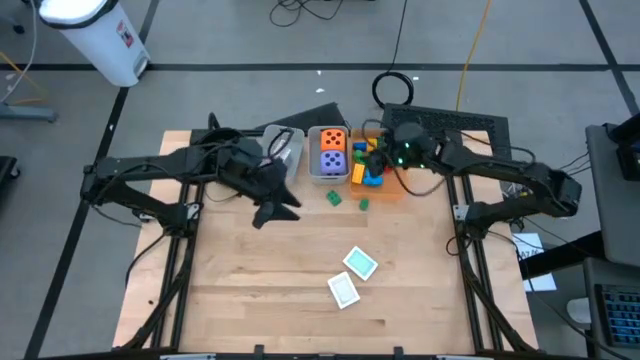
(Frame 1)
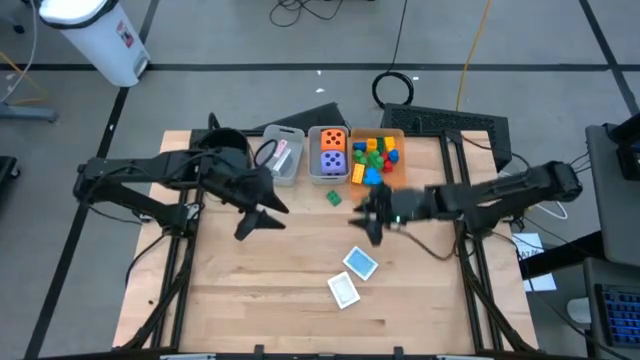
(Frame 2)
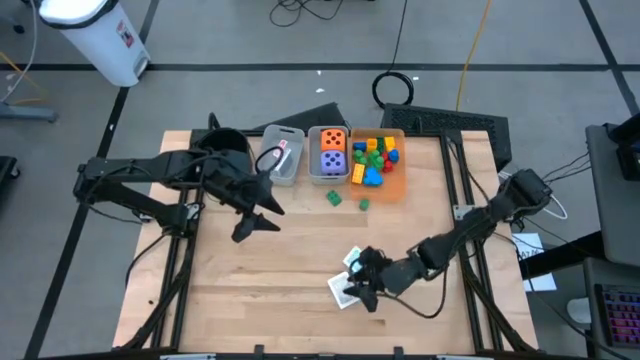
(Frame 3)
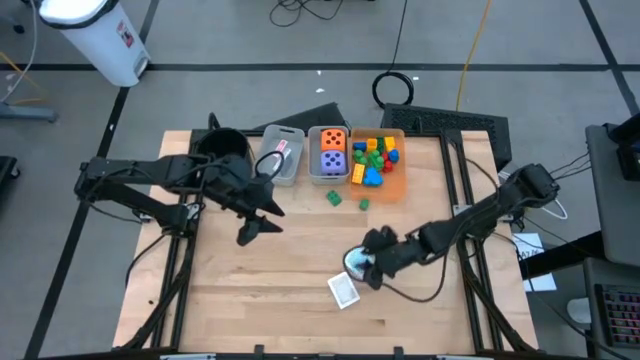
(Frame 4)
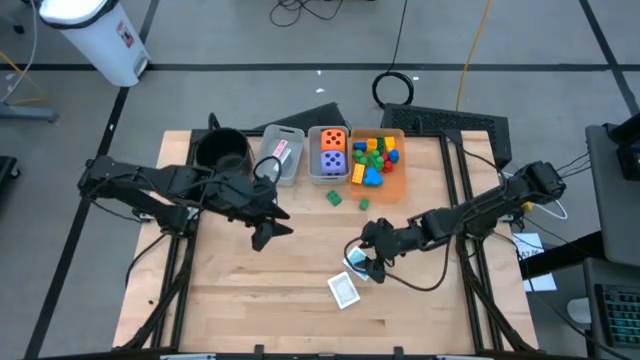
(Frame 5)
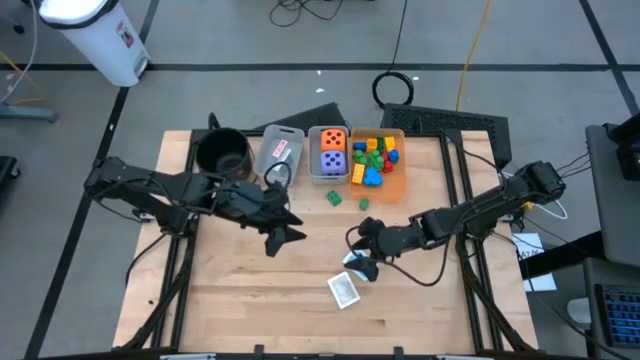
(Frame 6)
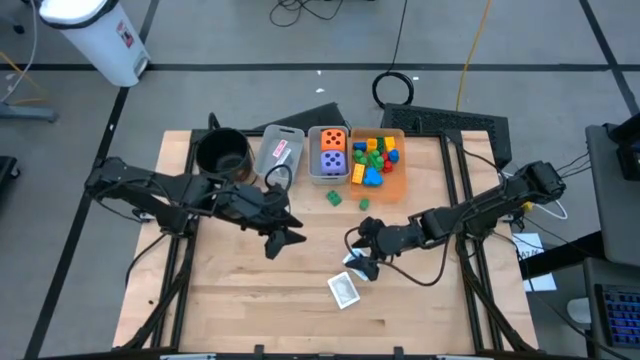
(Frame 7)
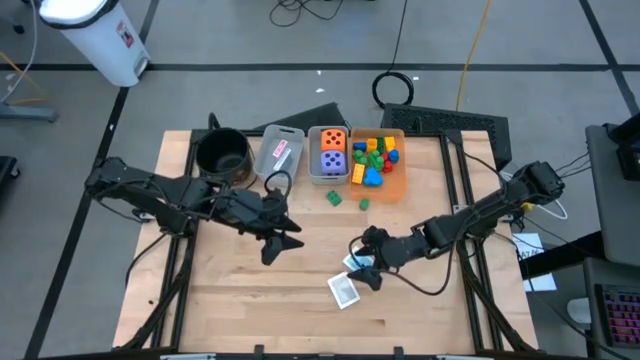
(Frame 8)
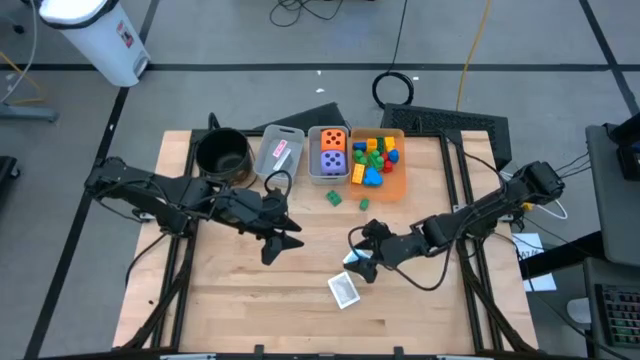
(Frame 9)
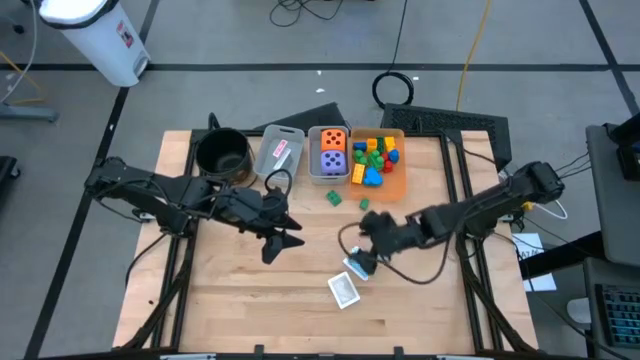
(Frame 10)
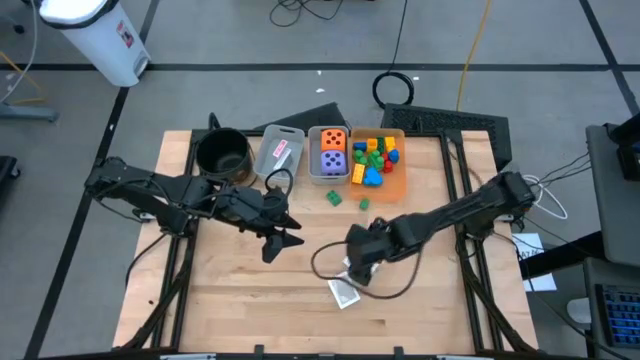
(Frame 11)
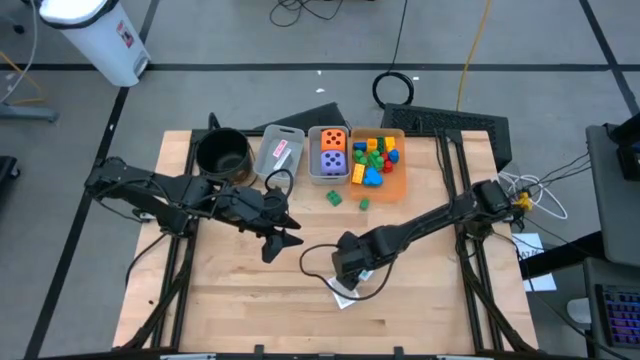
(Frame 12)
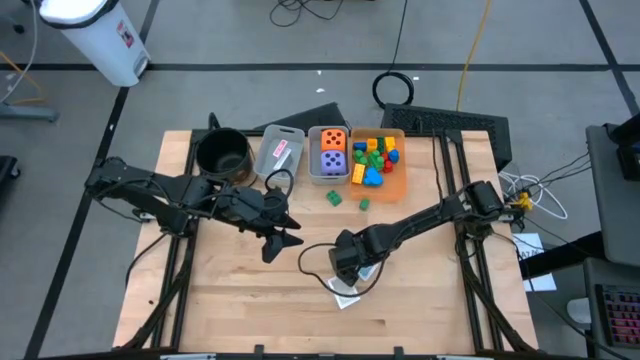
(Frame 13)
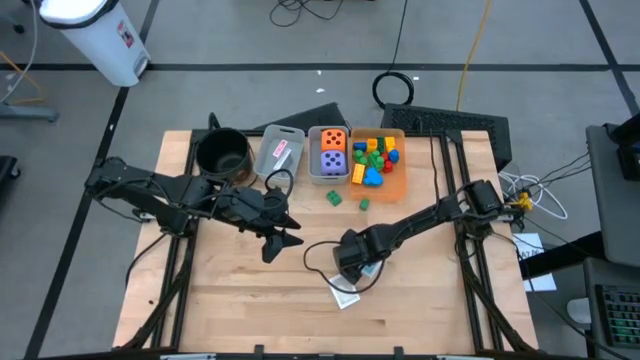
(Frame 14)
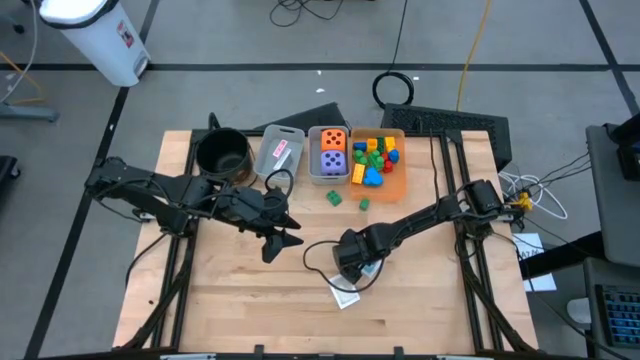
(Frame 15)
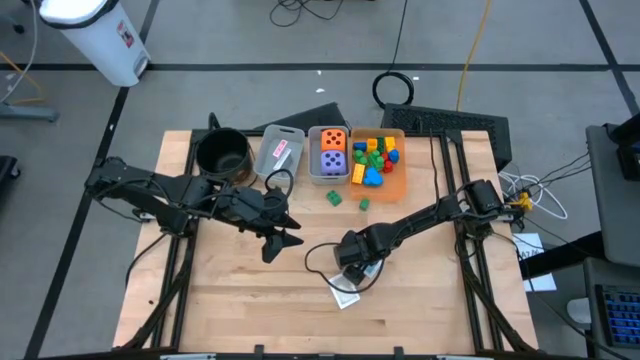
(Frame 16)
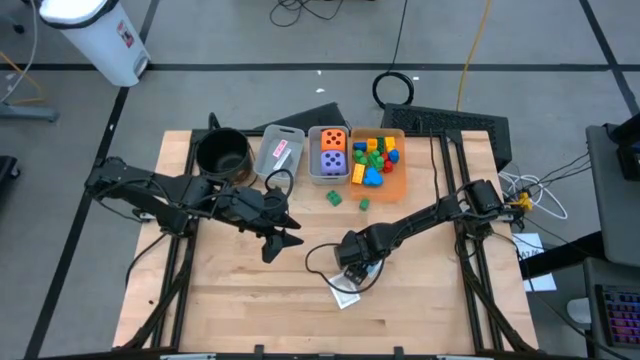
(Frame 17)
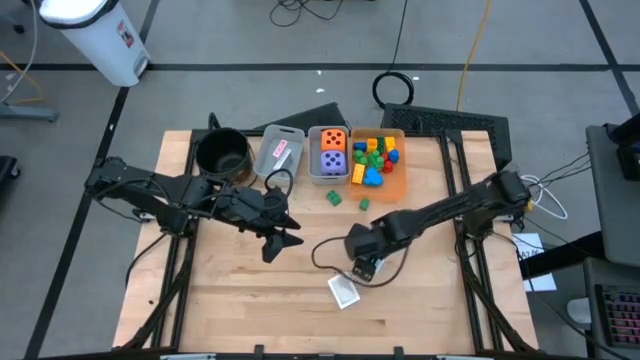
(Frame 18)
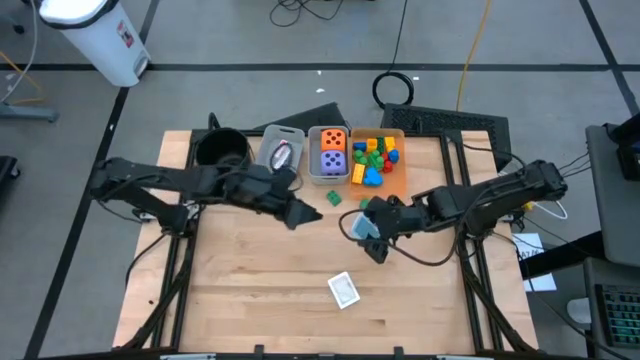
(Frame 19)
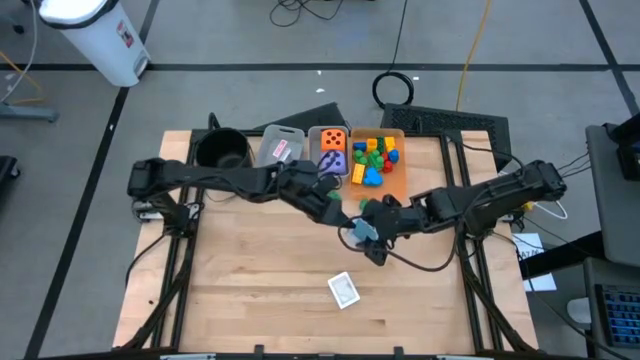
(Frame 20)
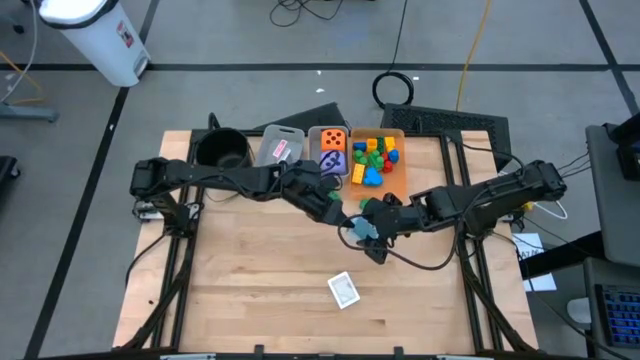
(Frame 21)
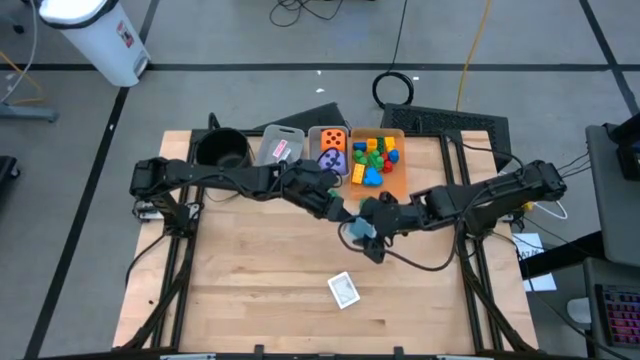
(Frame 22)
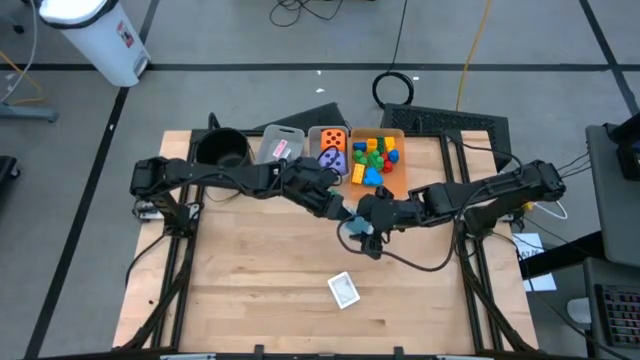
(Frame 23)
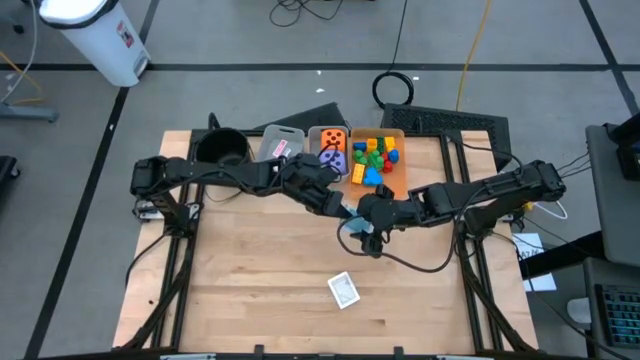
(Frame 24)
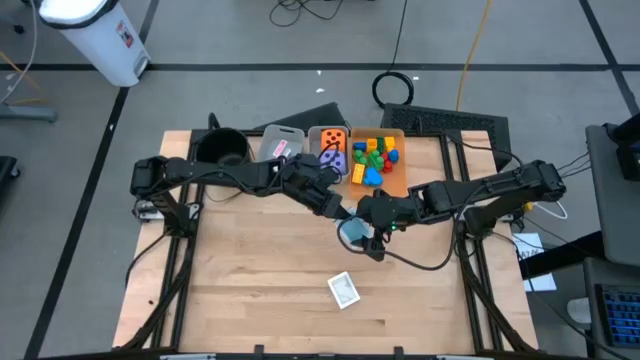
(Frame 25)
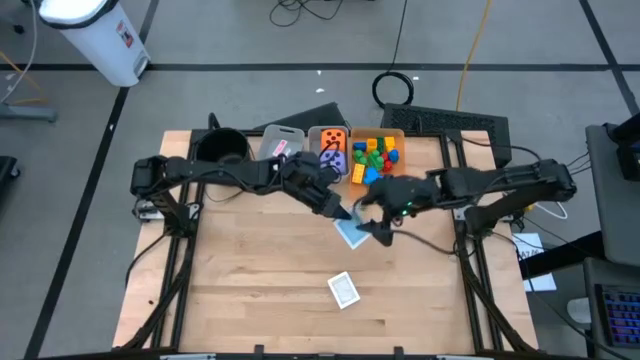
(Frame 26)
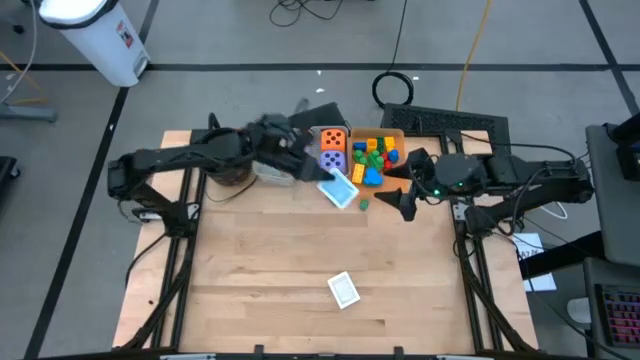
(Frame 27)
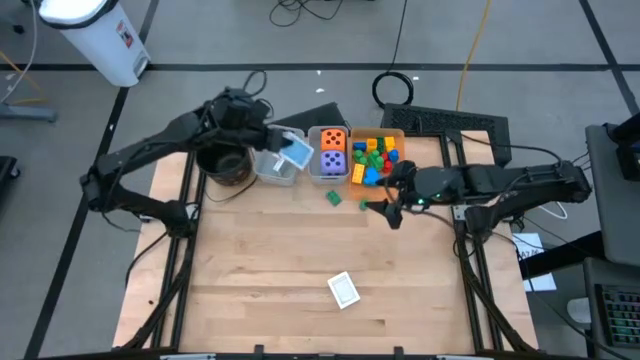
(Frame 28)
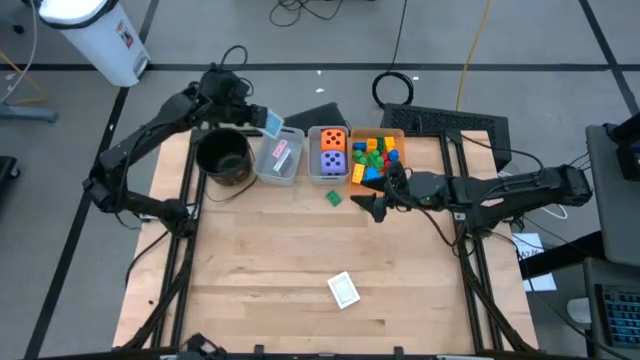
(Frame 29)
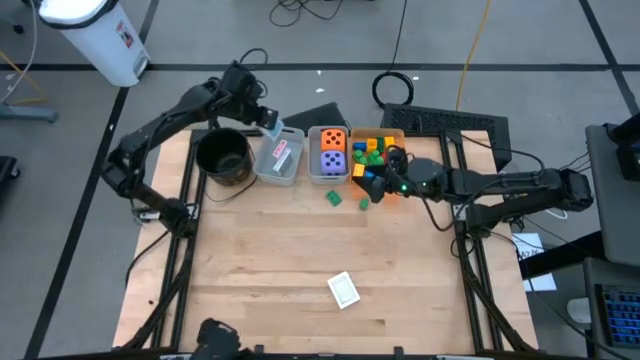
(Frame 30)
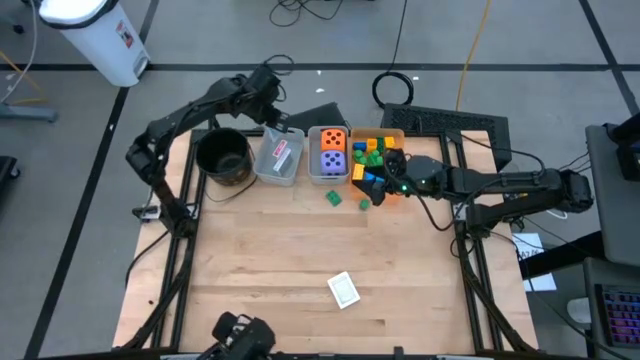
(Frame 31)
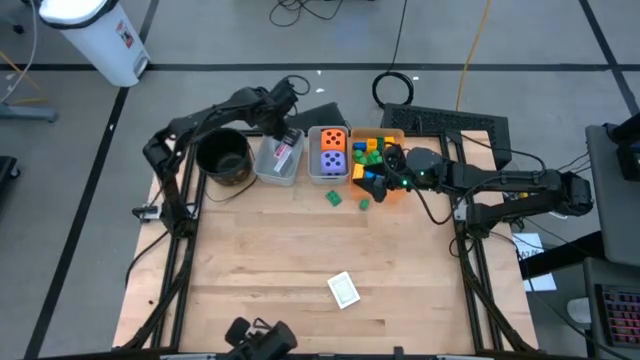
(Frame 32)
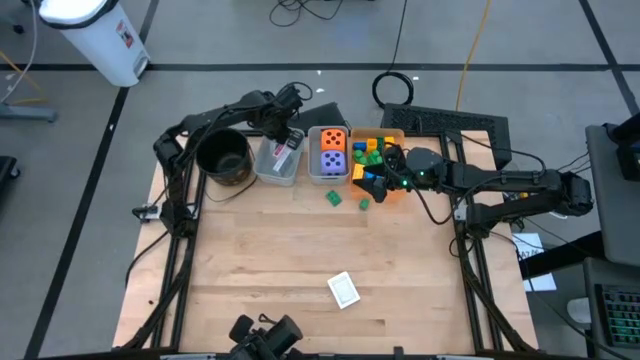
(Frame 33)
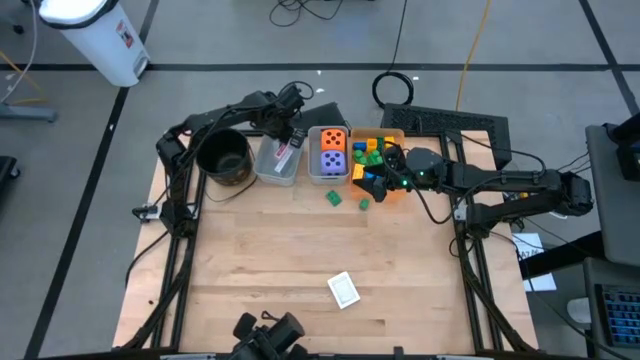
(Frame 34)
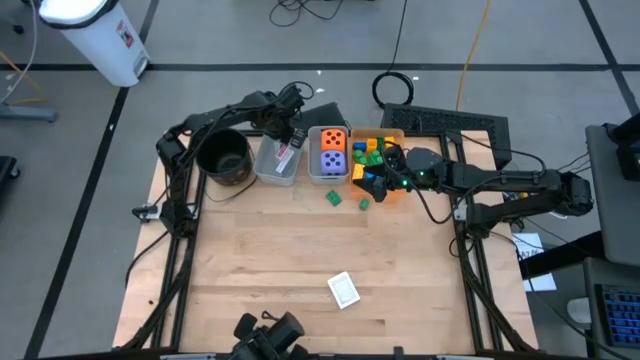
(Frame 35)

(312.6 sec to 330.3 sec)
Task: Pick & Place Toys
Put the blue deck of cards into the left gray bin
